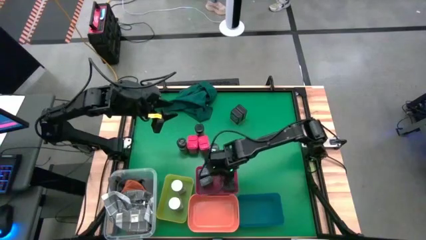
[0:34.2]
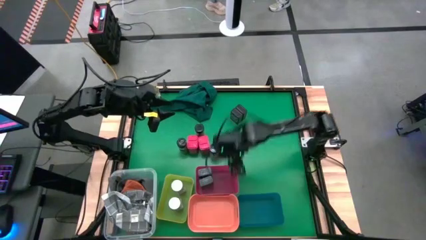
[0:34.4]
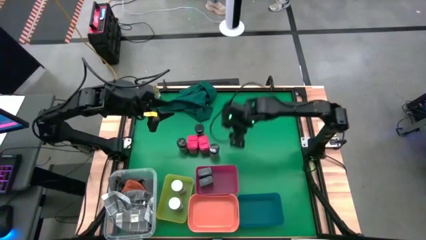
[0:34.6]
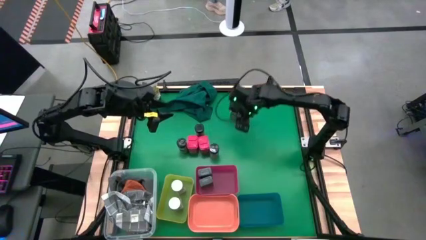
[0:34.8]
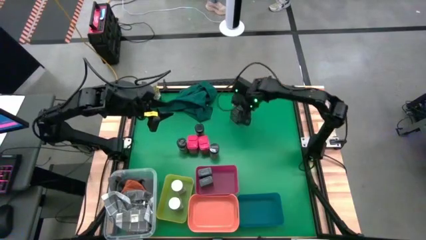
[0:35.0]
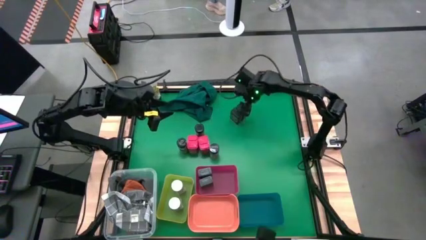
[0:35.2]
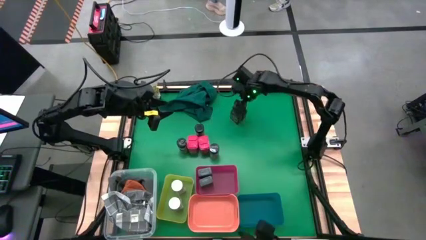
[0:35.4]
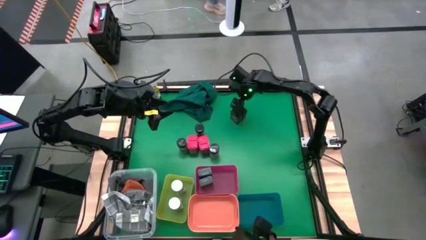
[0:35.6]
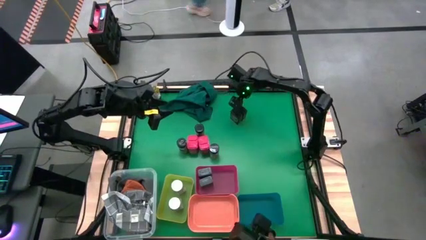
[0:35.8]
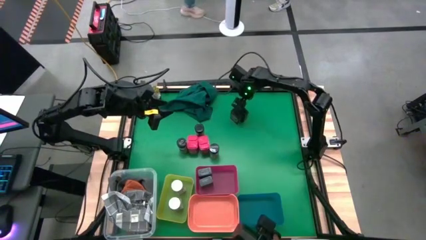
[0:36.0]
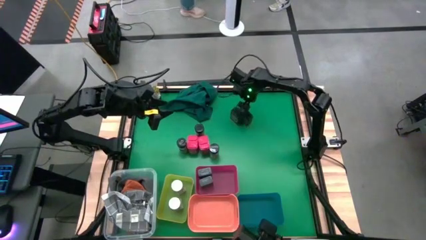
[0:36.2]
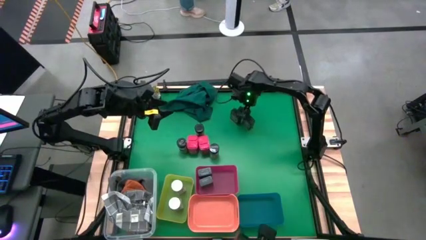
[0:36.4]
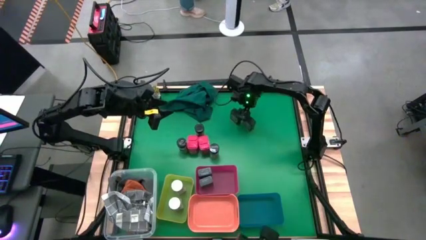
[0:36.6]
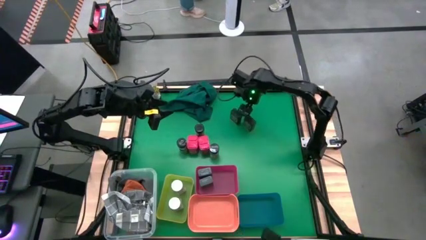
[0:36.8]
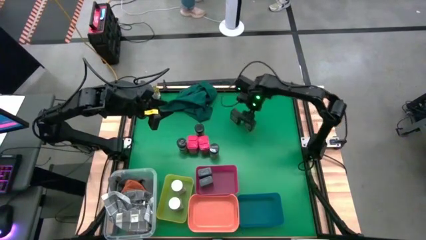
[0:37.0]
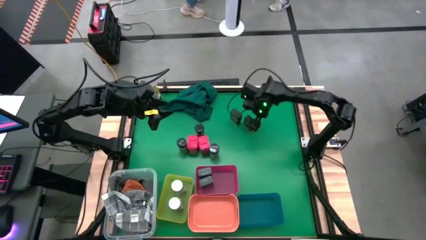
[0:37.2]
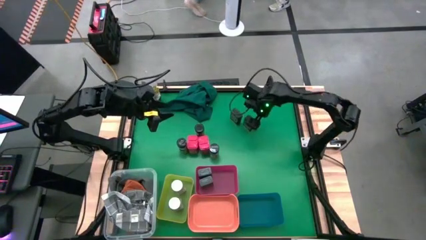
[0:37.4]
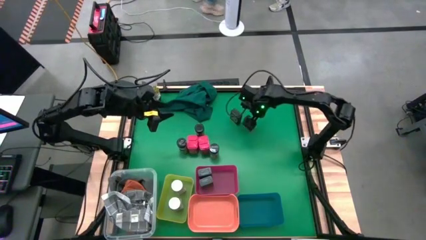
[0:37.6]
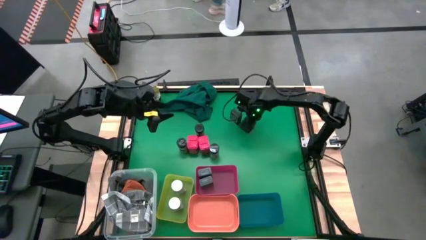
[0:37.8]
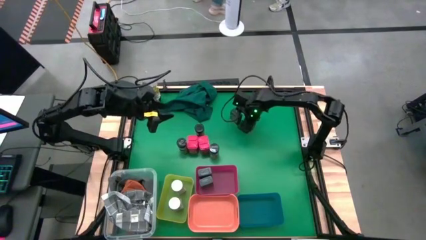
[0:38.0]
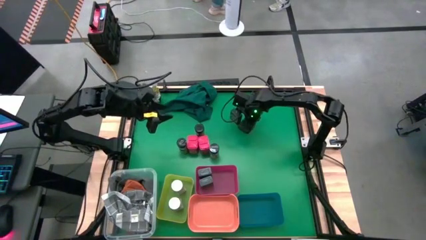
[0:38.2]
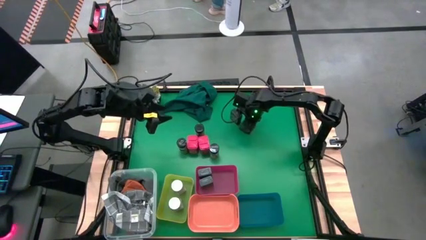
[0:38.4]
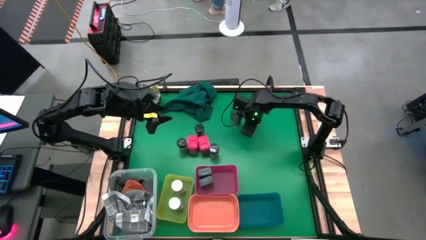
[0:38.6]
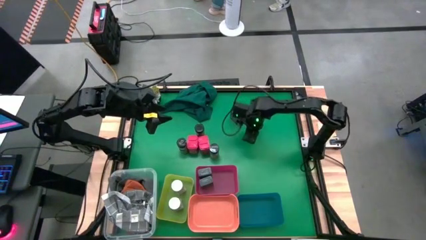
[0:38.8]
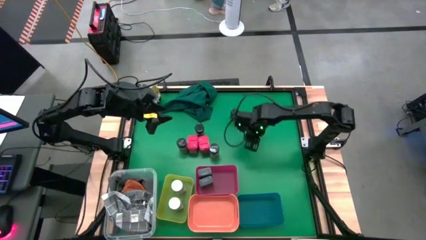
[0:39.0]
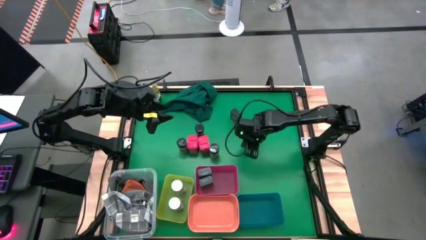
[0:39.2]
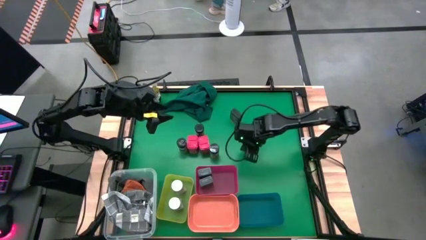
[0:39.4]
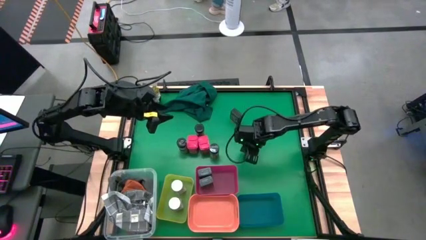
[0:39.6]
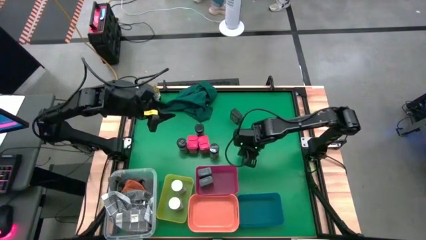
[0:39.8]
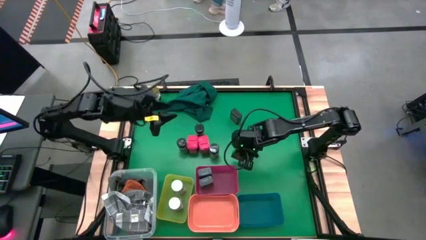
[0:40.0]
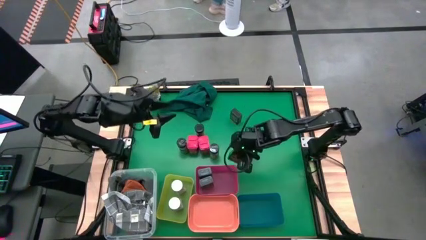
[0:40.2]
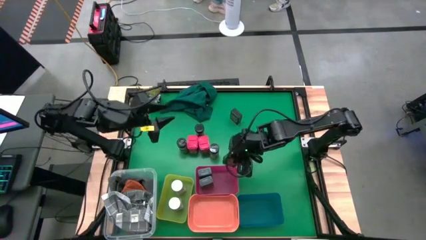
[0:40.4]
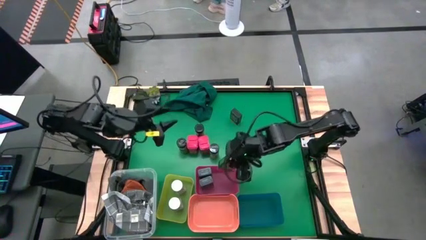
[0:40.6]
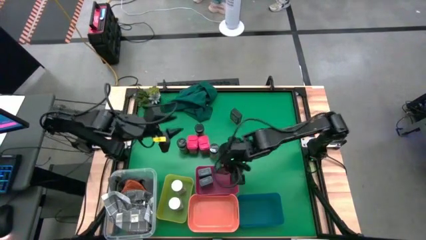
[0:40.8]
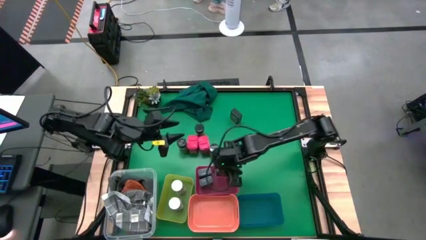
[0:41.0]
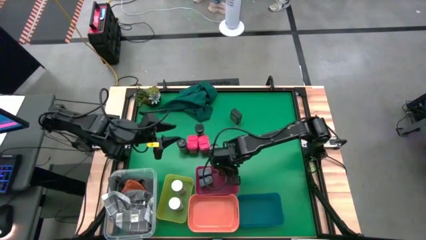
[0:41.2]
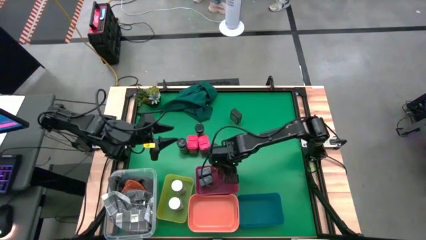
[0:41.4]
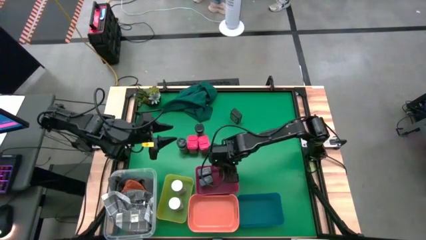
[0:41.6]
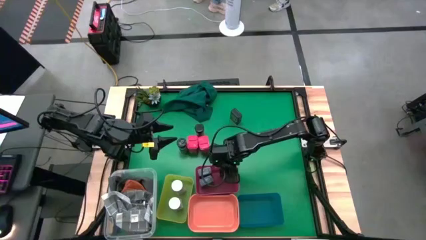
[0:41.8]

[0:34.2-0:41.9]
Task: Sort spices by type
Put the top black seasoning can into the pink bin

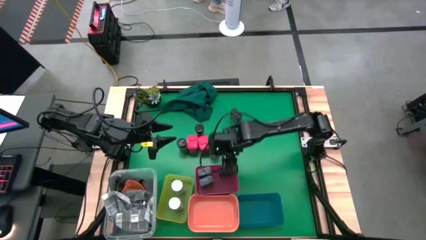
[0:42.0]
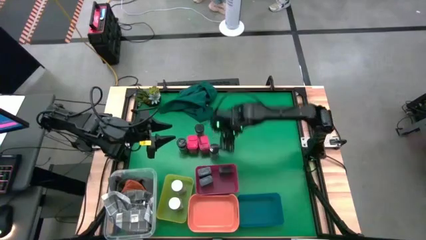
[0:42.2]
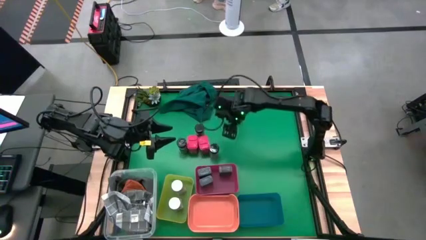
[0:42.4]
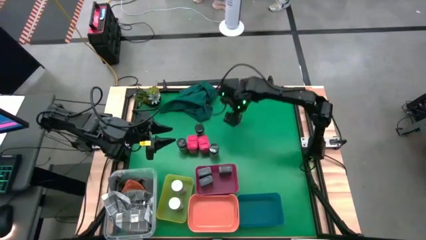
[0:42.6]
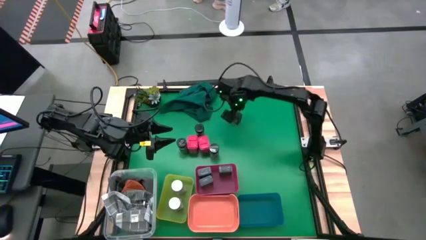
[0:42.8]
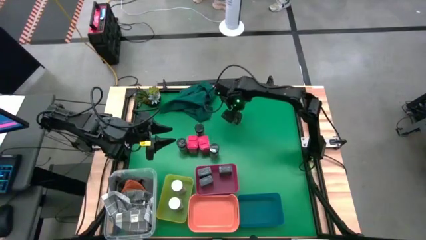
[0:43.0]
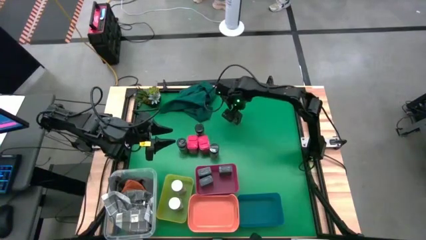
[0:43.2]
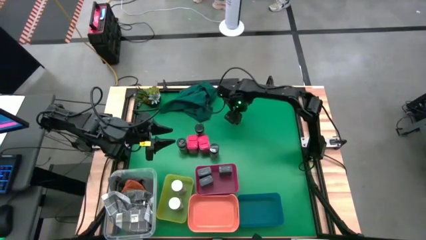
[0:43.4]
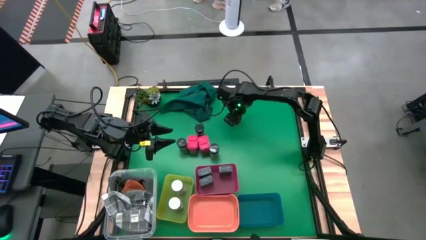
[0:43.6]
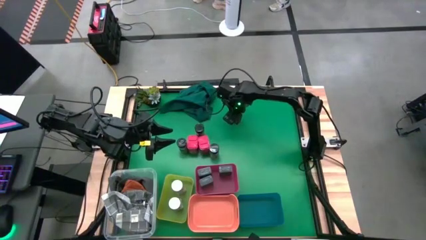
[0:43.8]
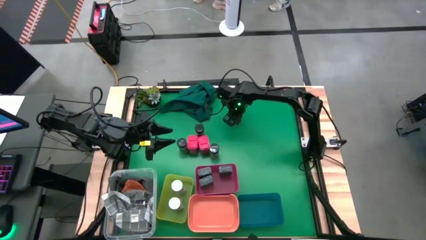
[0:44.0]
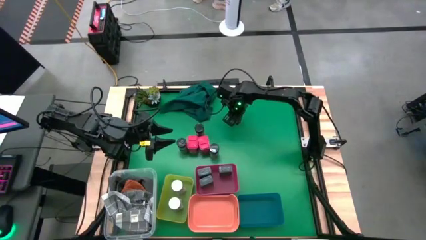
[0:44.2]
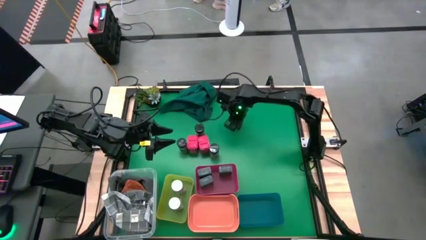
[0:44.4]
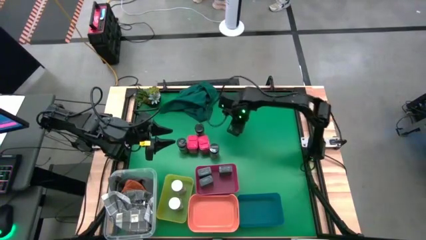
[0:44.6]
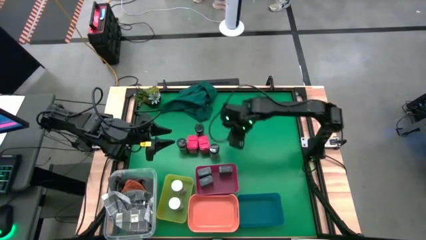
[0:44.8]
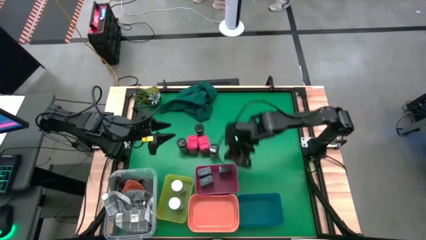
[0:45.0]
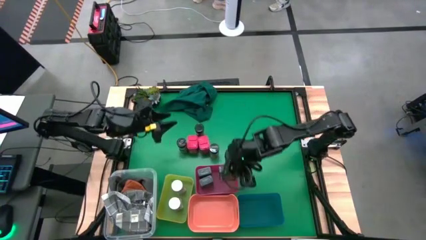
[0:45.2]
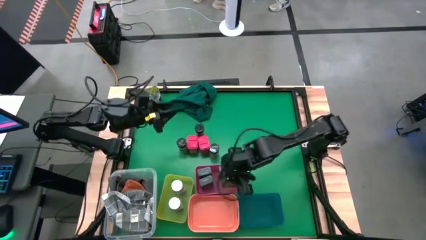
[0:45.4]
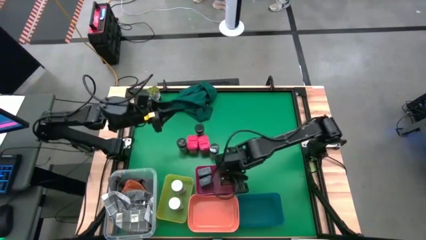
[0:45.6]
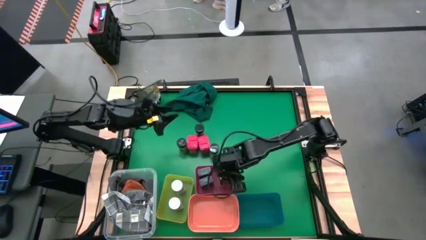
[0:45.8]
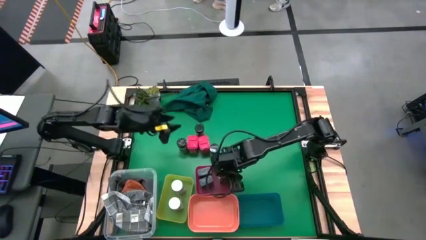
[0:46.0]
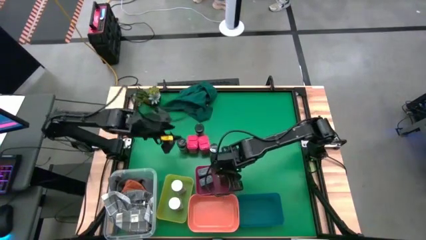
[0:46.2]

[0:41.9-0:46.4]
Put the black seasoning can into the pink bin

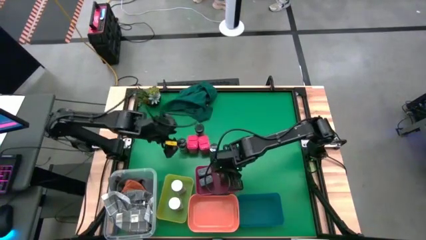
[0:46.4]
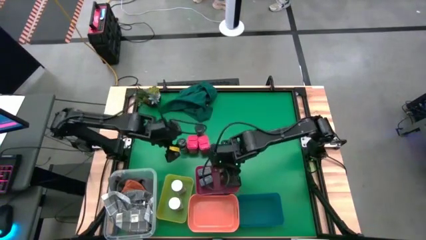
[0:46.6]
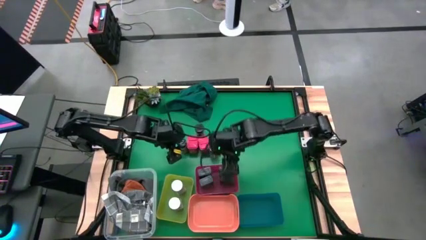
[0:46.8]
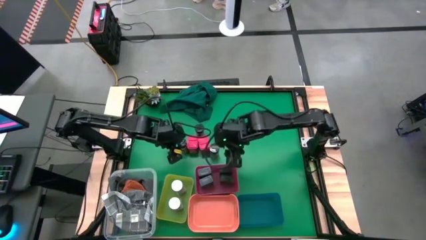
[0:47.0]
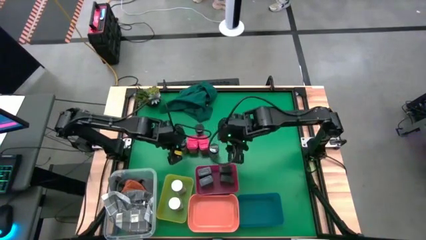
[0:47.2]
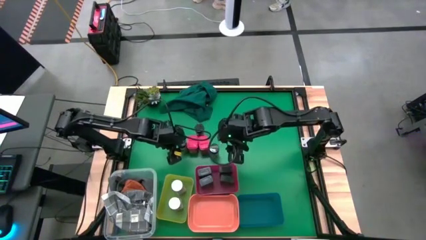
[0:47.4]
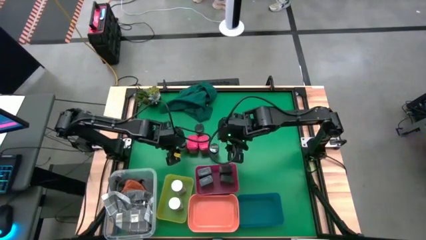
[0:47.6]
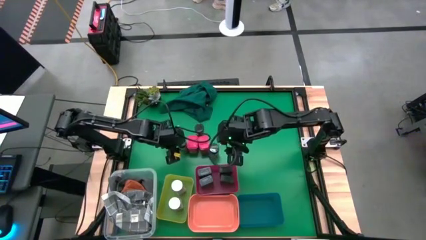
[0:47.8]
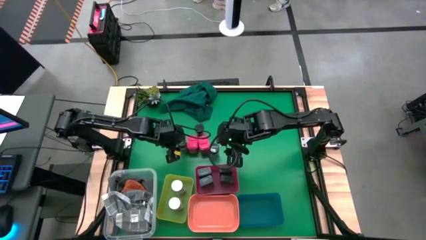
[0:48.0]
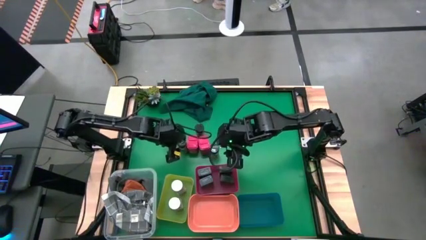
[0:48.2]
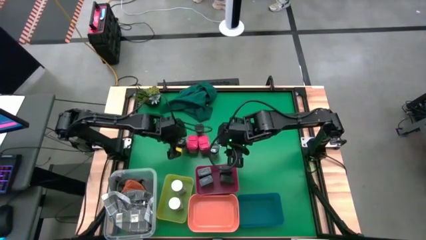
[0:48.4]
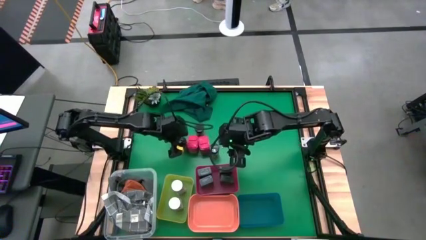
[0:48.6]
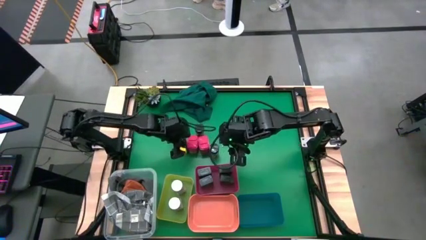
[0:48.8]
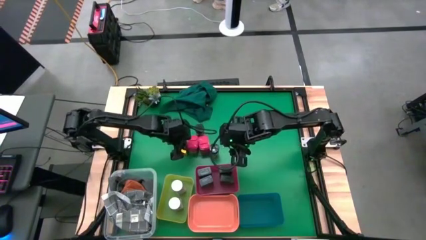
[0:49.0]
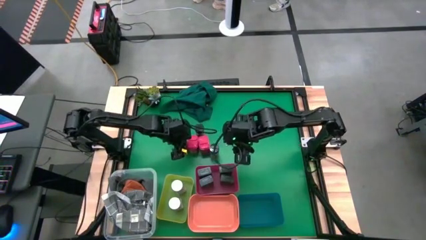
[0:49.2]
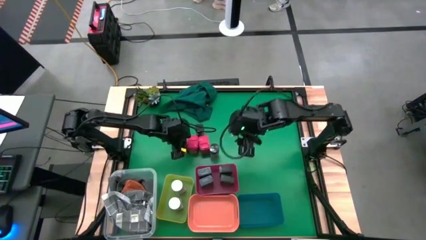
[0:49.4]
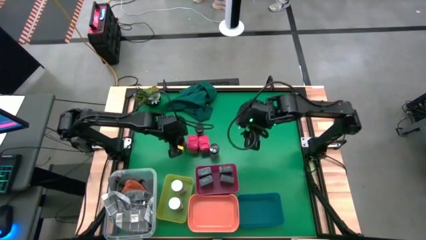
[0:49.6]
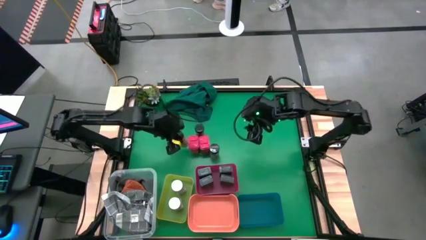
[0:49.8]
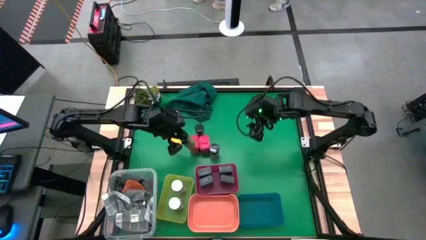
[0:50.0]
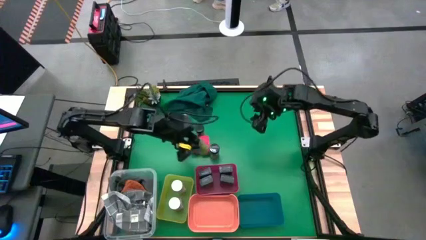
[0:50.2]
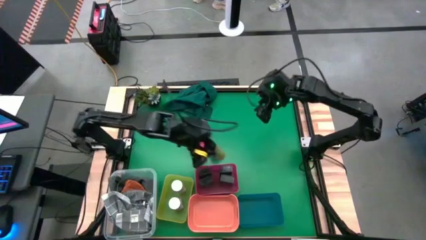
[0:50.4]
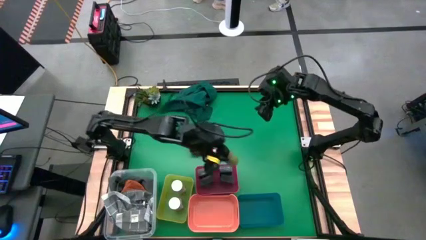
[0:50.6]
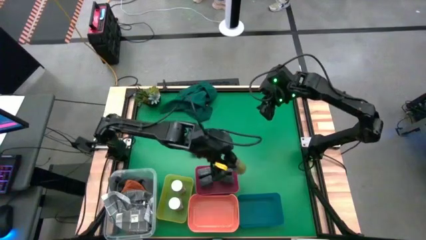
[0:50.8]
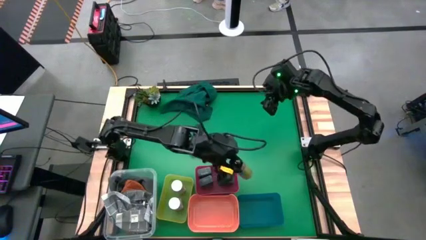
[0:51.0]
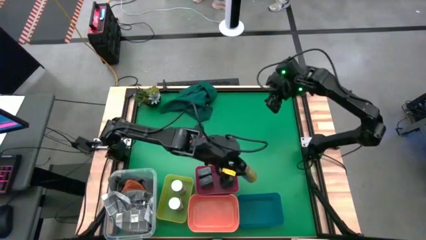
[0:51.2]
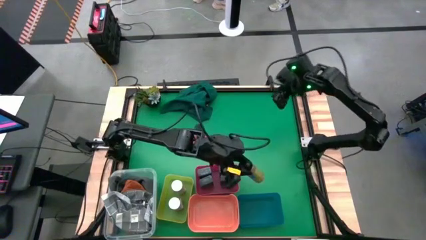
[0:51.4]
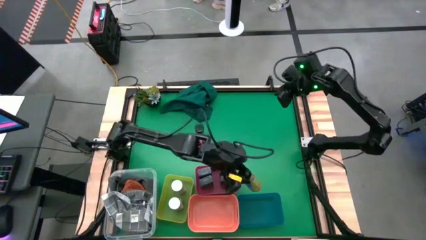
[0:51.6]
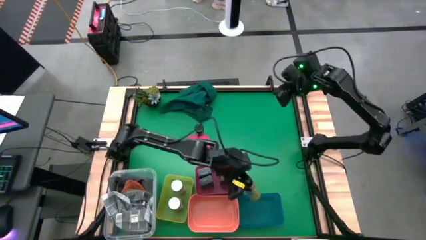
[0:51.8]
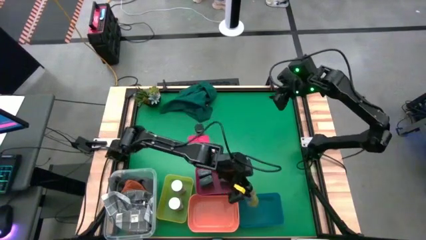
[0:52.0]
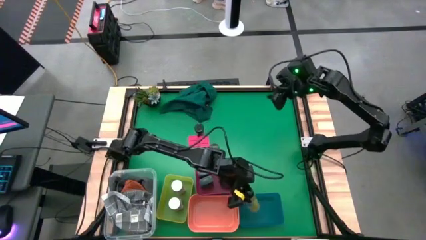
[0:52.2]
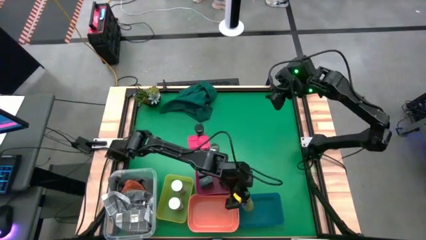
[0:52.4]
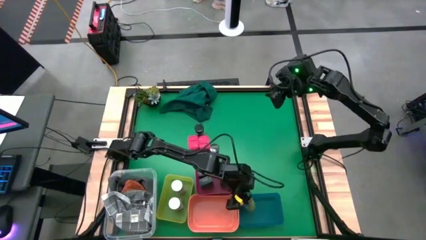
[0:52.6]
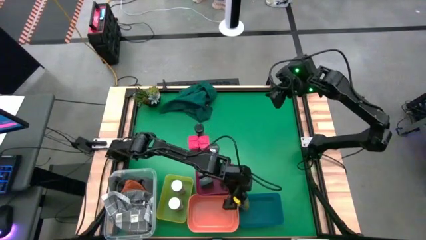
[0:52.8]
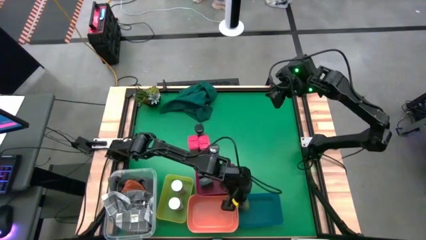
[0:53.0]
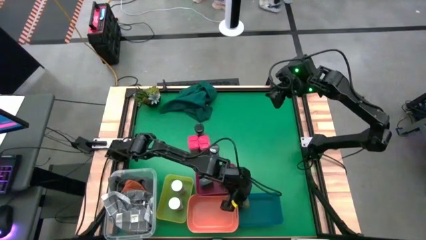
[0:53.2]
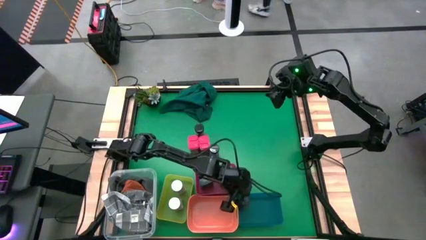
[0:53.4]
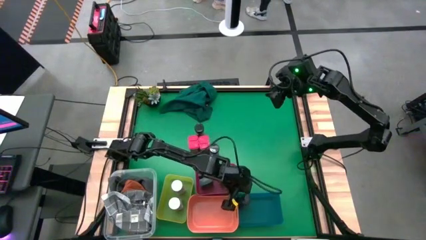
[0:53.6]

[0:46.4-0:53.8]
Put the bottom left black seasoning bottle into the blue bin
